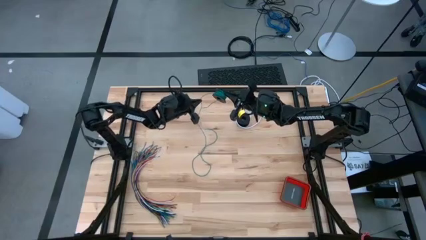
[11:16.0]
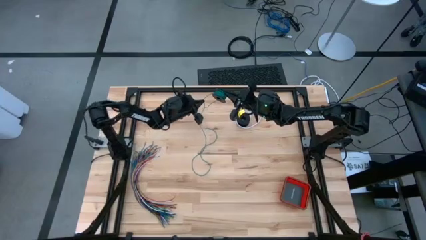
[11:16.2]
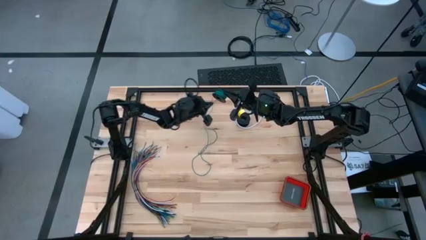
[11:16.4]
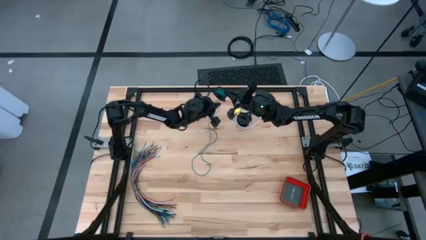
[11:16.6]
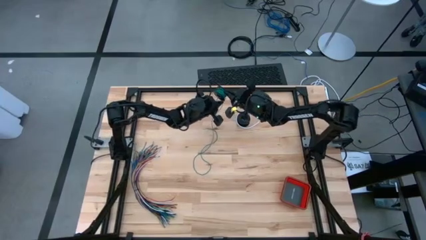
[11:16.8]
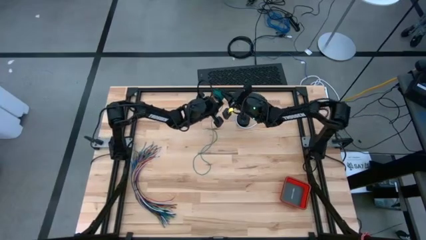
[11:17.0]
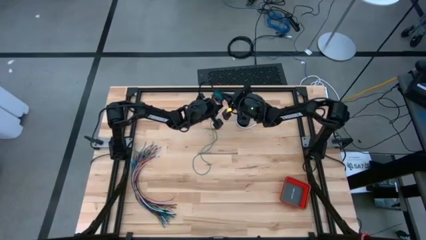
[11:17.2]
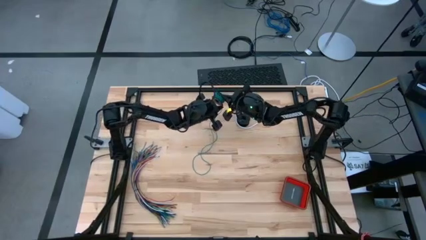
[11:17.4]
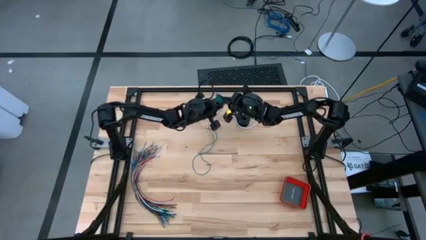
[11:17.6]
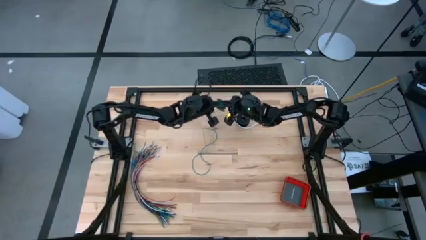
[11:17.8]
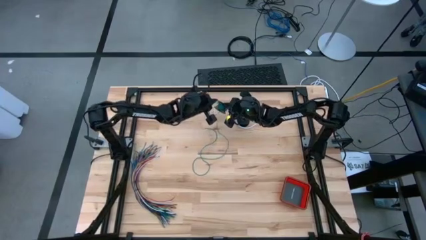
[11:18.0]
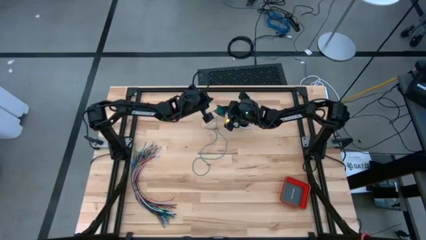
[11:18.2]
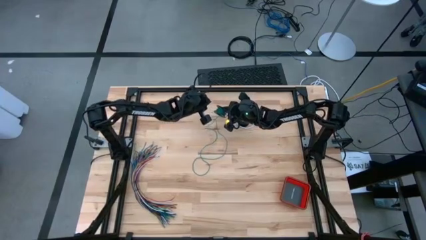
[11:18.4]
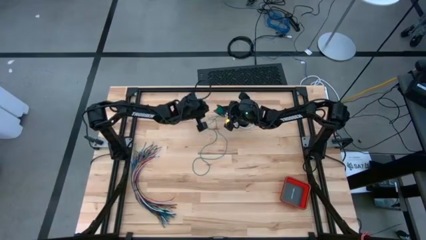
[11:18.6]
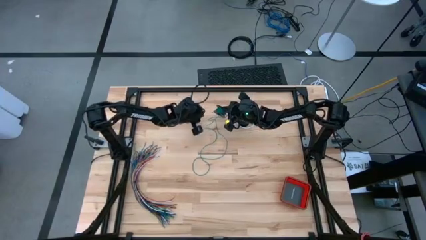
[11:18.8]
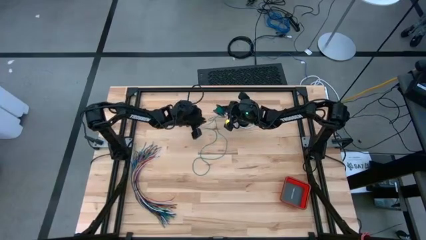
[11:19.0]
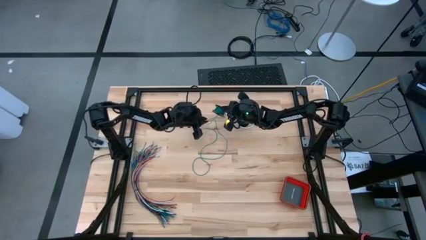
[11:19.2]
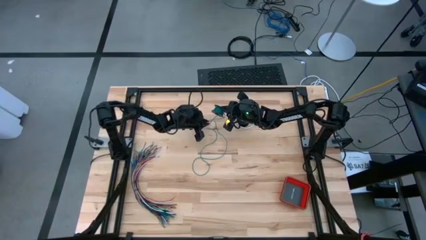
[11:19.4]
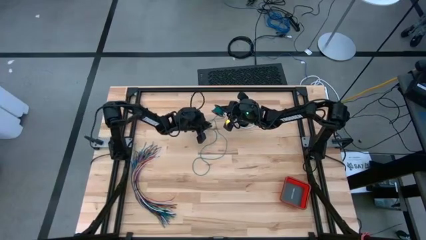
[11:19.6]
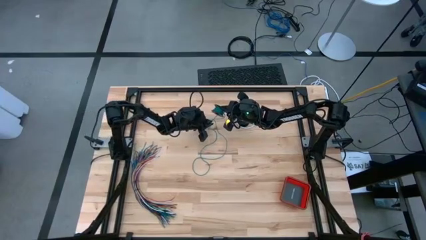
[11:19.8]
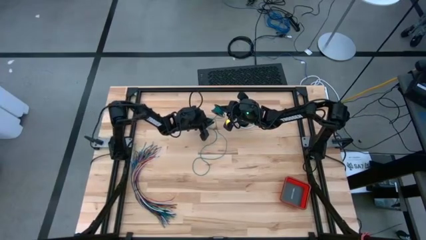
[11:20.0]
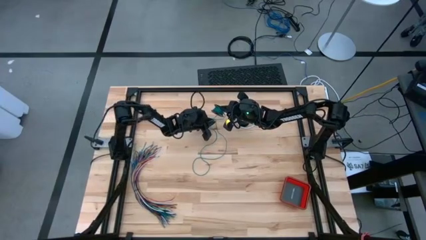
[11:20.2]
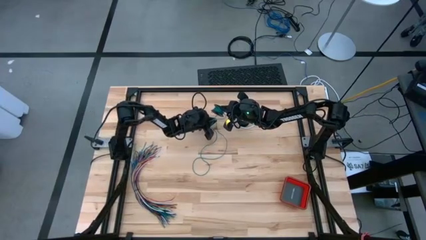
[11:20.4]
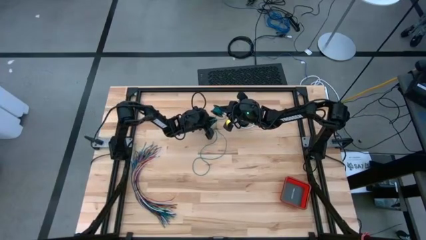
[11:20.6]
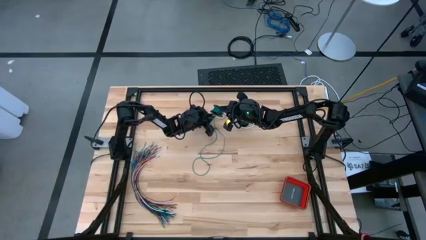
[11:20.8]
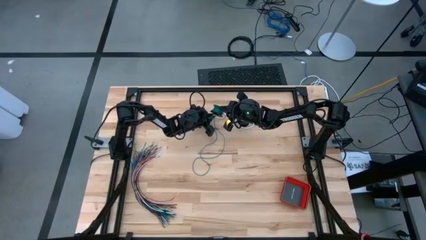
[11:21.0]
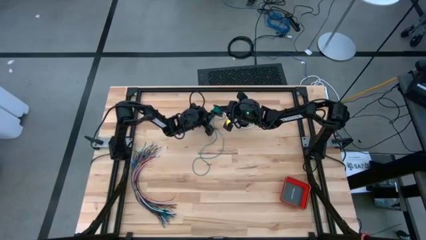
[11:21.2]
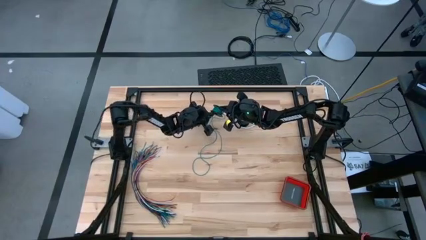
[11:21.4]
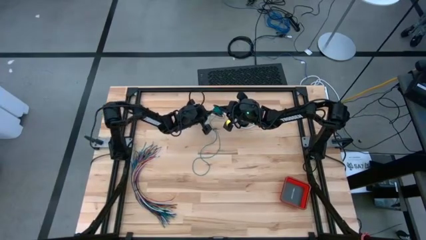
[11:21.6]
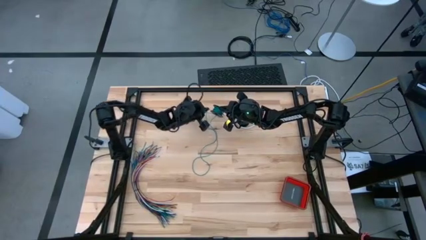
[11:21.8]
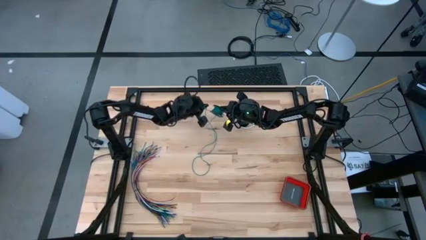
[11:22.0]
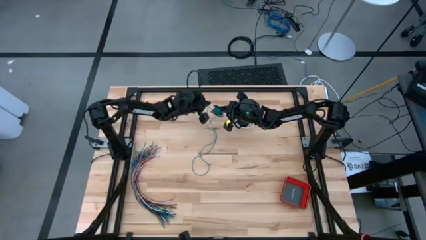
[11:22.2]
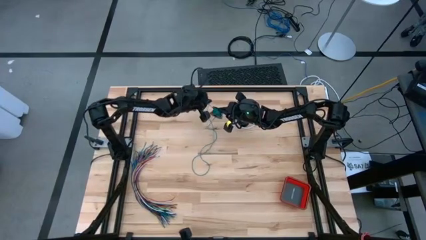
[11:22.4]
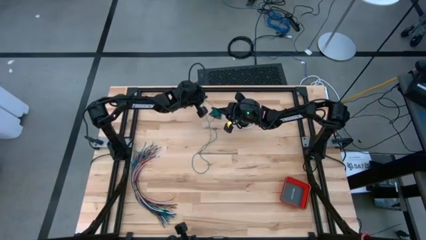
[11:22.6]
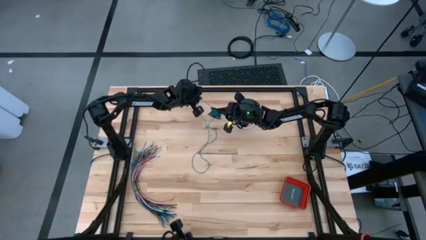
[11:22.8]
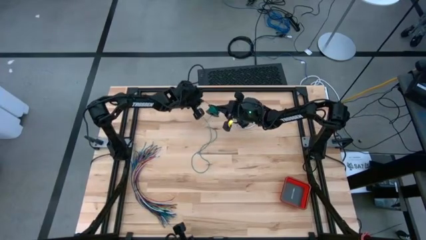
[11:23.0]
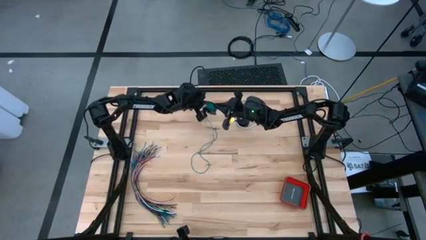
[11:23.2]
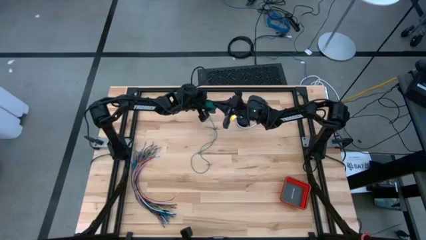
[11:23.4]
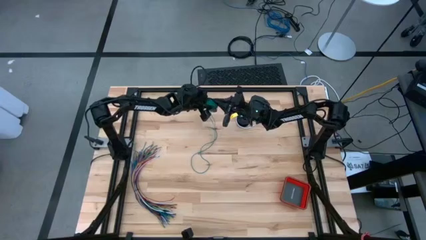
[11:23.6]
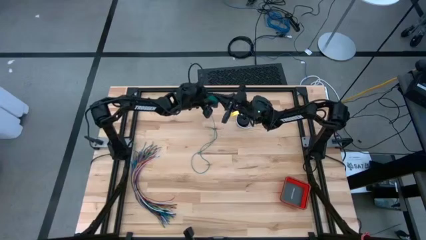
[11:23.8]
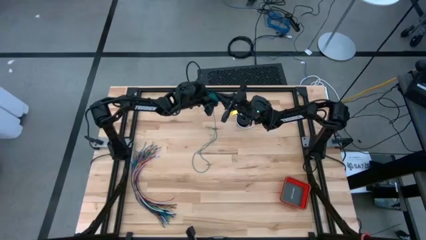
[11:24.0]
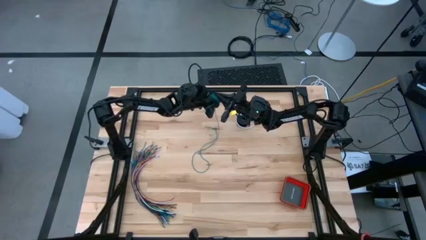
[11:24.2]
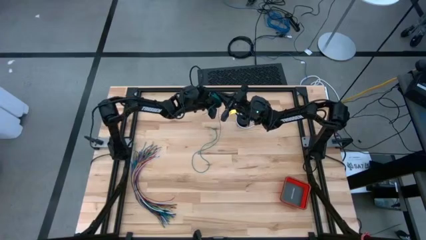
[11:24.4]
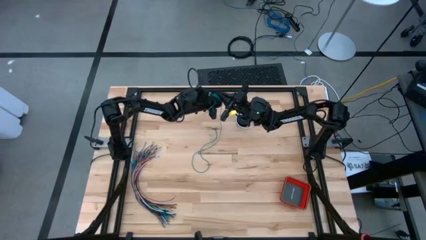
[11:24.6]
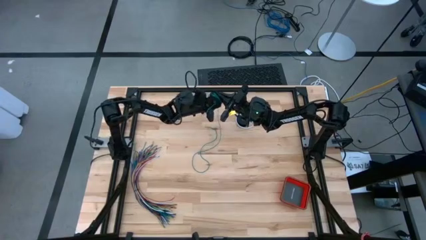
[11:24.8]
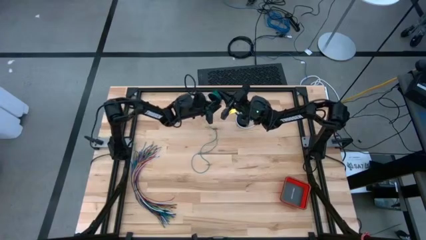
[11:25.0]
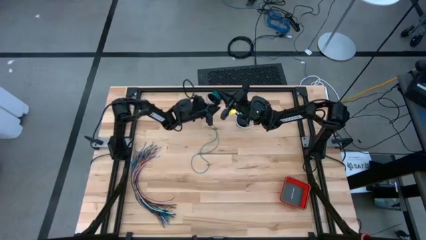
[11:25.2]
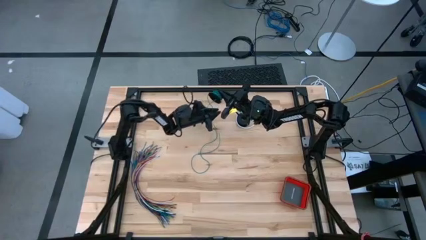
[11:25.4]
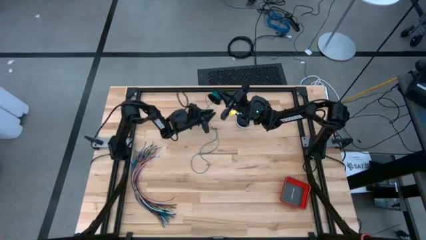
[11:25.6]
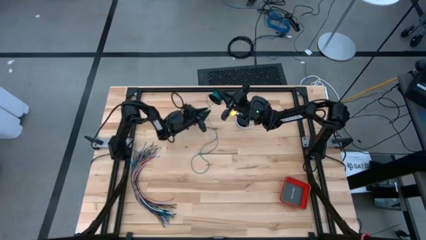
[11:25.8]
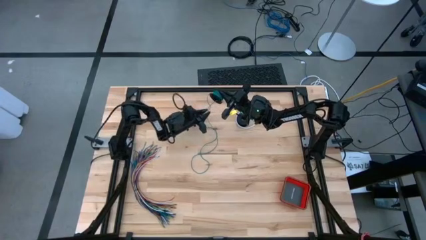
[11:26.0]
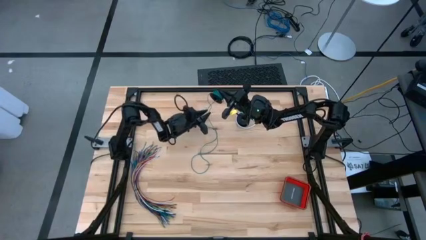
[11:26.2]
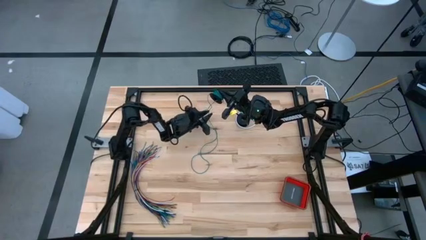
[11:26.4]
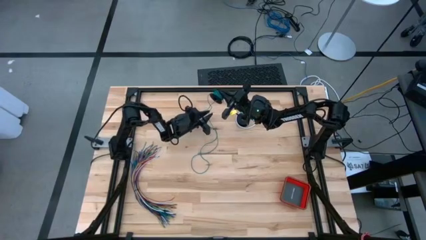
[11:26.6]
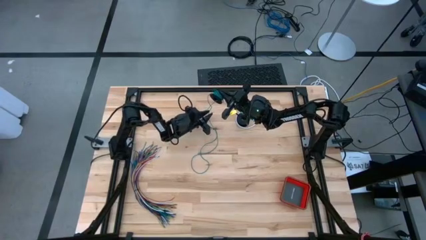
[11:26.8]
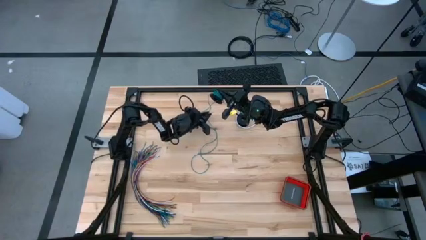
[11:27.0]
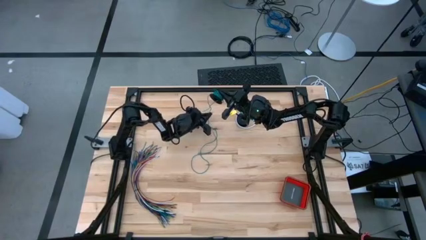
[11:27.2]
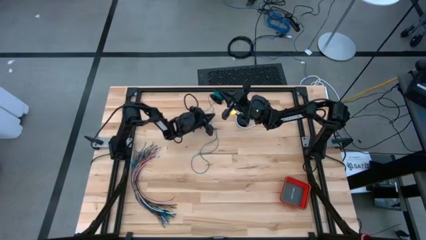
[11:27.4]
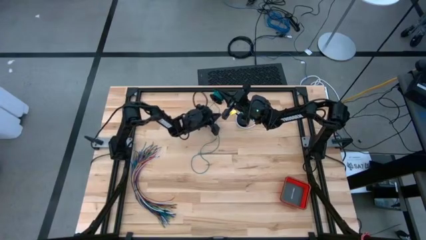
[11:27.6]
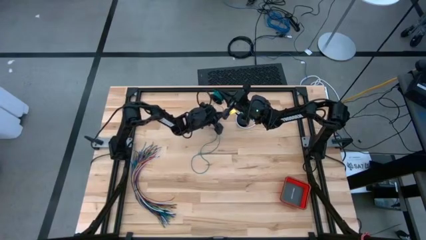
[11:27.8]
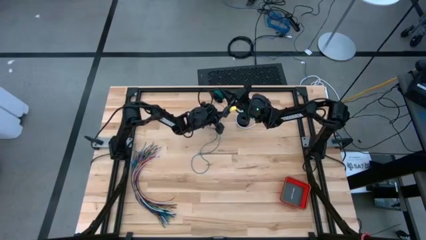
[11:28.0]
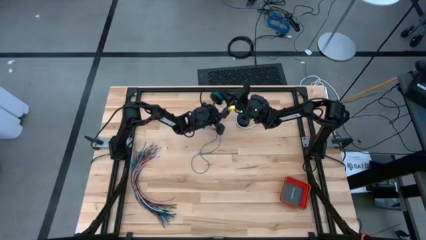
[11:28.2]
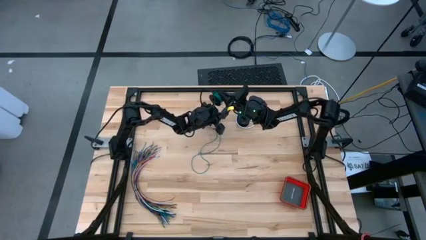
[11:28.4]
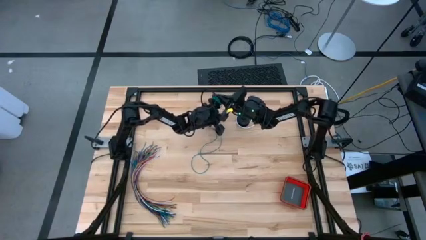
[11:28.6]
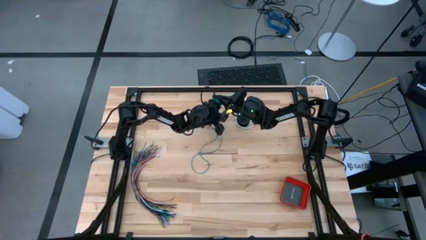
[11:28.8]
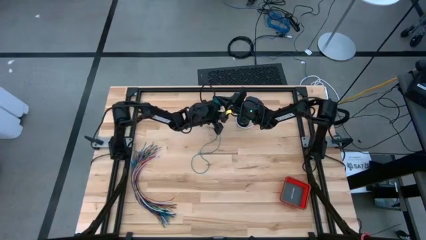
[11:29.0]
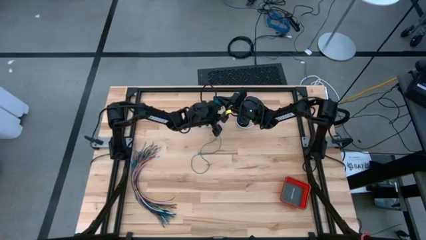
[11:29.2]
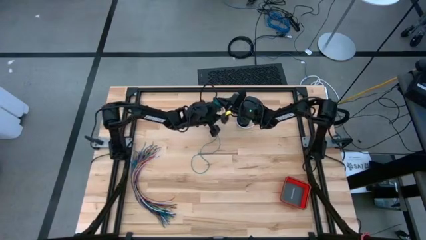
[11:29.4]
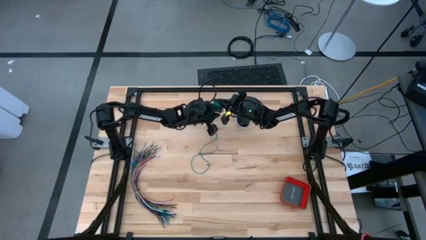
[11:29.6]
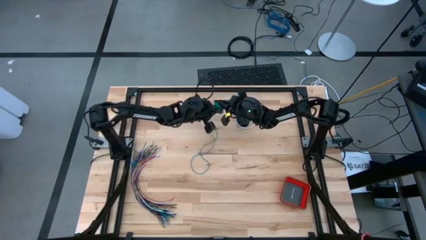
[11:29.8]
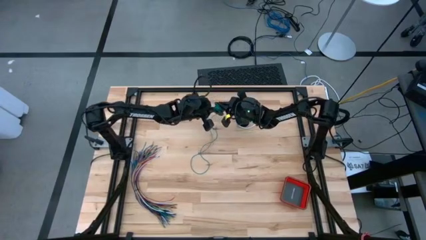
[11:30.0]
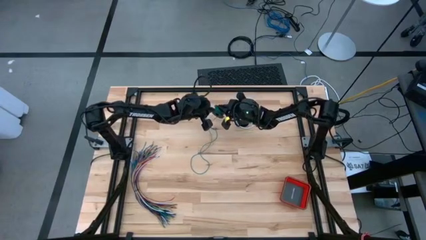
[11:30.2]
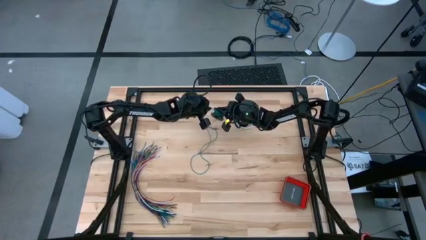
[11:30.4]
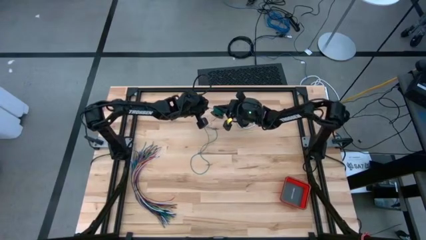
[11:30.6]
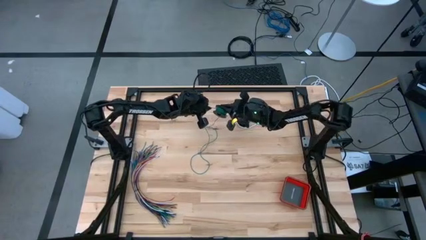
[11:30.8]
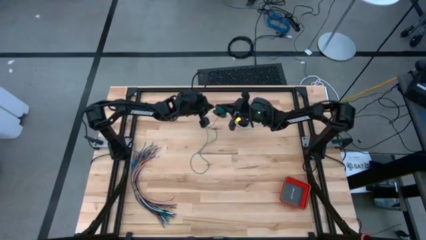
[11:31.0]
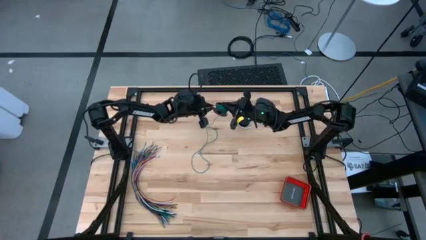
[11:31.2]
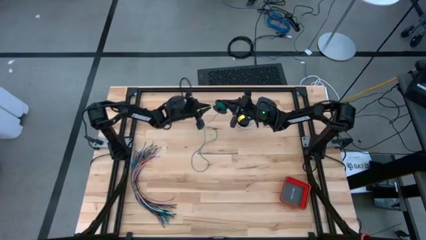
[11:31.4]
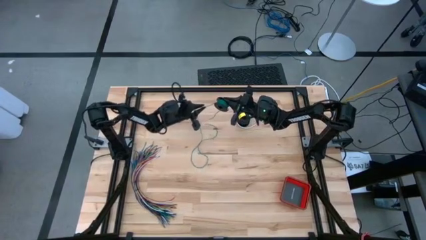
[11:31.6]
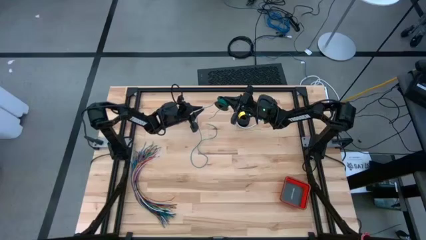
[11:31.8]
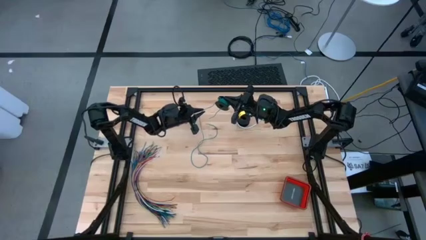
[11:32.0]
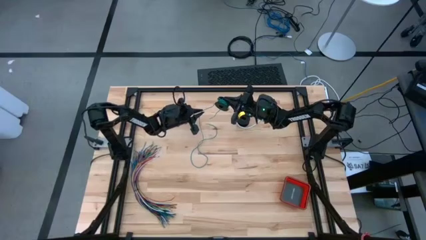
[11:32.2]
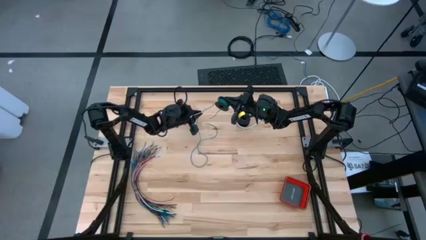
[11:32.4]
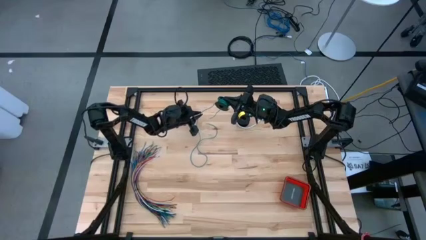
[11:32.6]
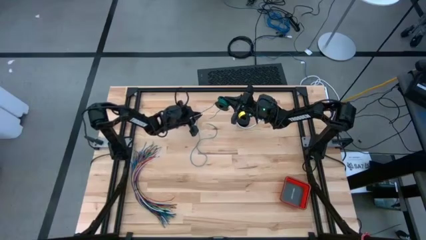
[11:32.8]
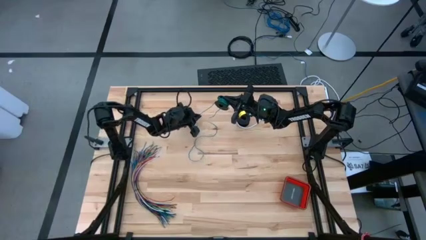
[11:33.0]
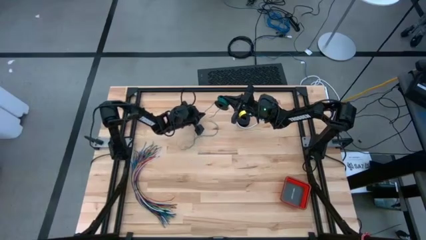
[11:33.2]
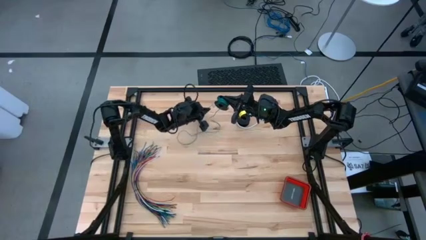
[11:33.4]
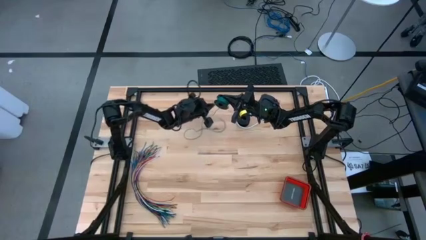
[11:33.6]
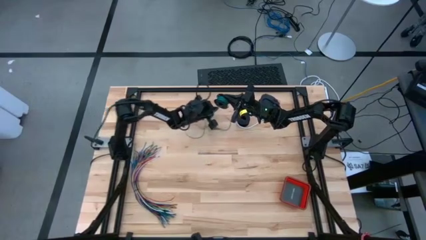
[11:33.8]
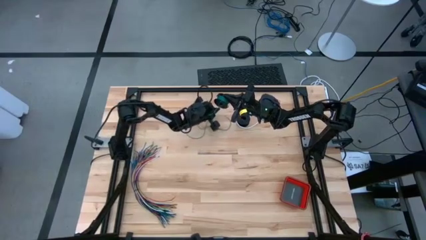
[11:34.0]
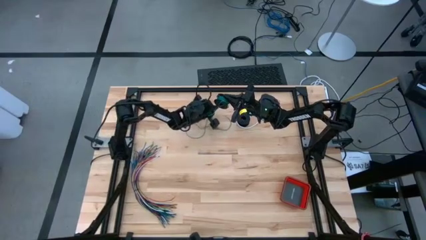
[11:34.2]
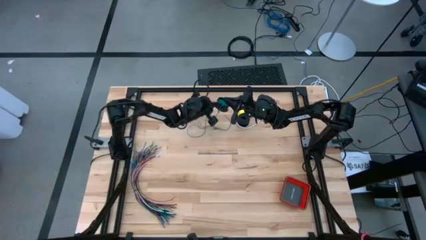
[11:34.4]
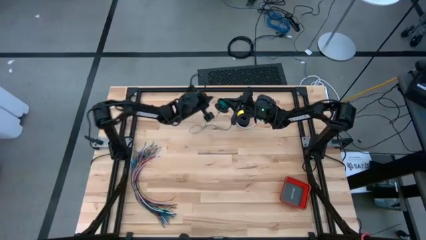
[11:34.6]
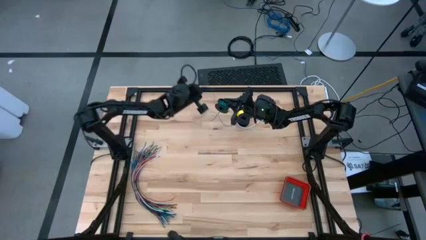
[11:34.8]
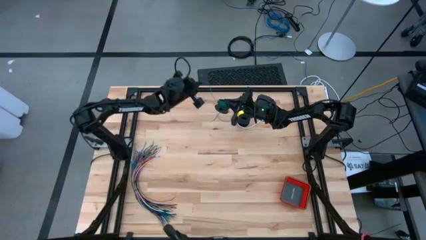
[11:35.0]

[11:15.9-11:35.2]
Task: Coil cords
Coil the green wire onto the spool
